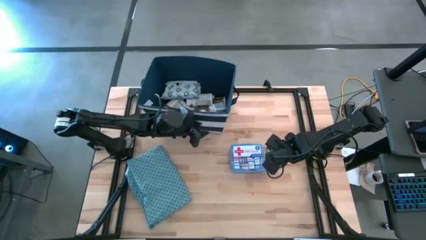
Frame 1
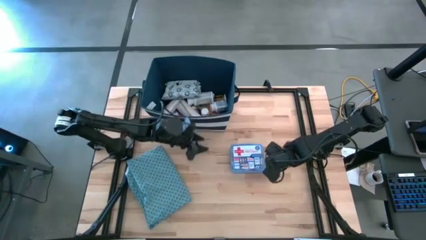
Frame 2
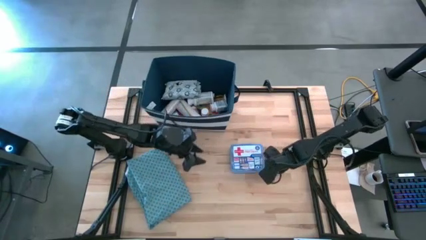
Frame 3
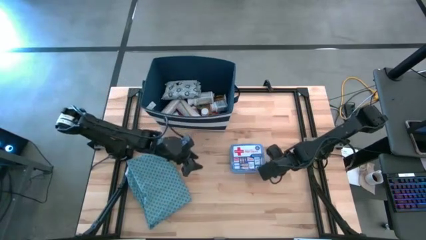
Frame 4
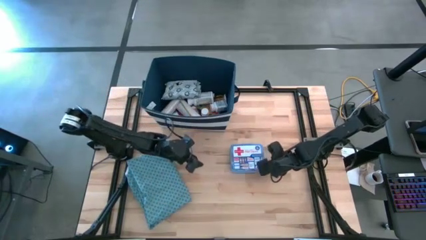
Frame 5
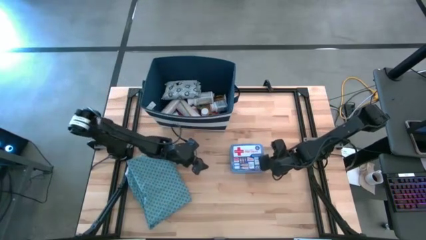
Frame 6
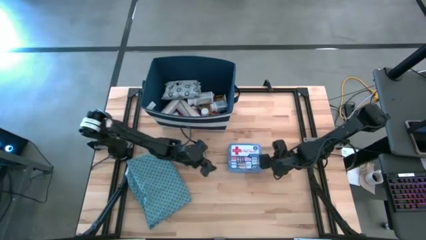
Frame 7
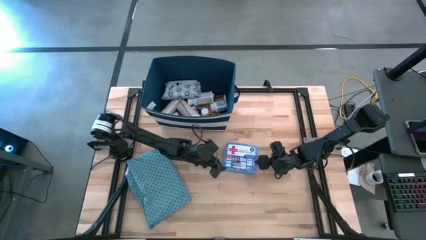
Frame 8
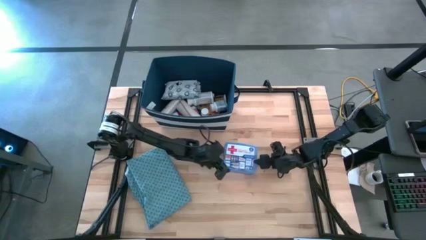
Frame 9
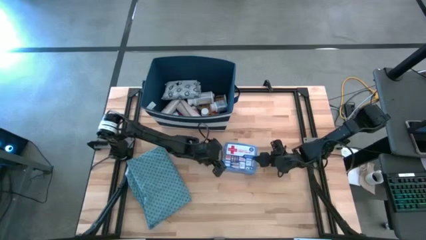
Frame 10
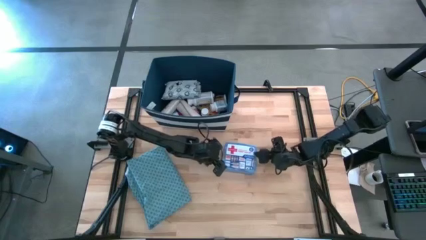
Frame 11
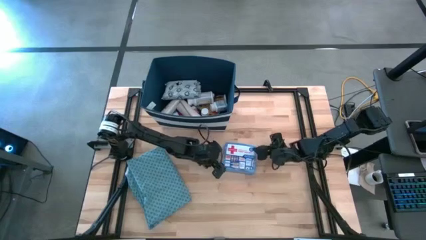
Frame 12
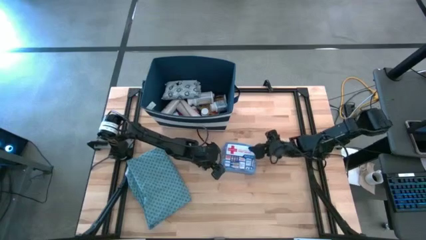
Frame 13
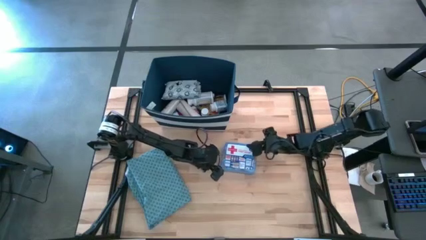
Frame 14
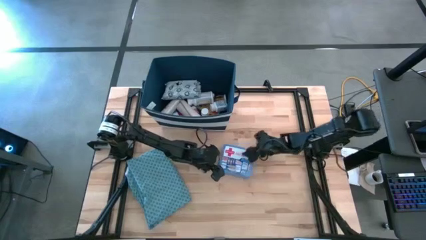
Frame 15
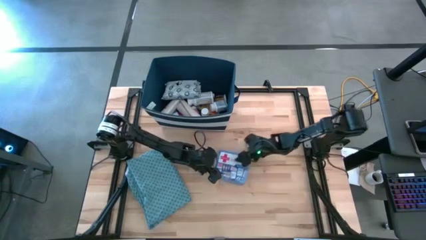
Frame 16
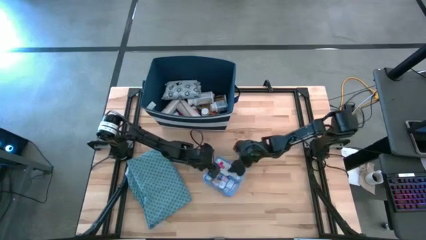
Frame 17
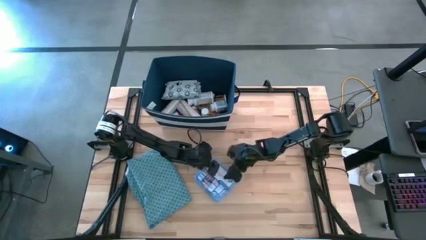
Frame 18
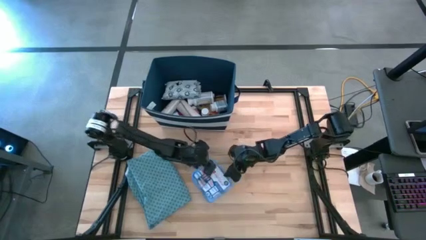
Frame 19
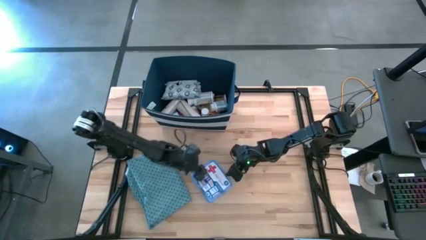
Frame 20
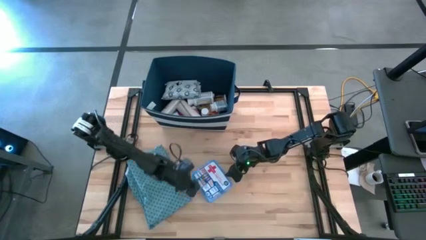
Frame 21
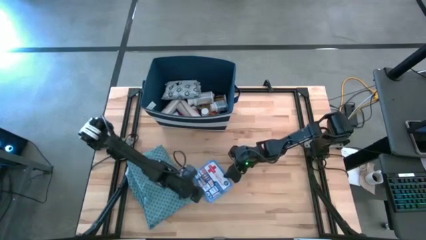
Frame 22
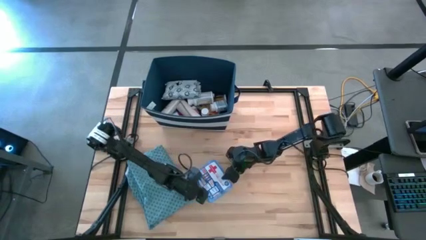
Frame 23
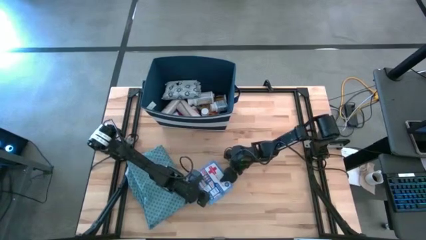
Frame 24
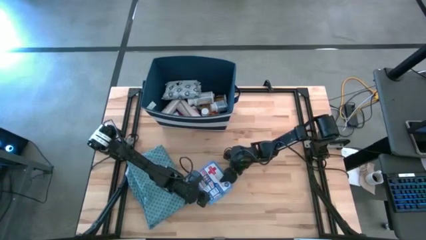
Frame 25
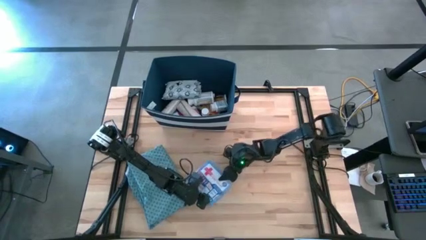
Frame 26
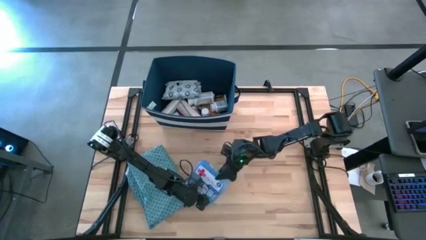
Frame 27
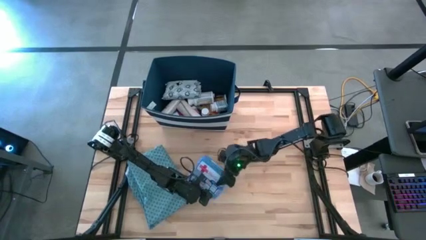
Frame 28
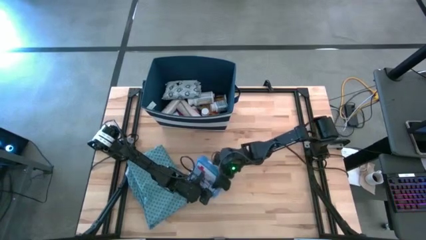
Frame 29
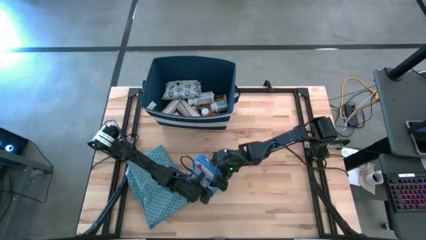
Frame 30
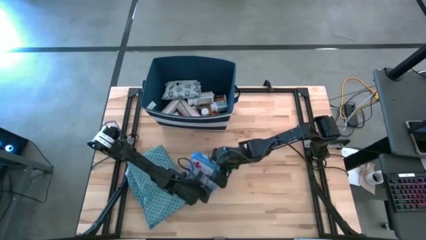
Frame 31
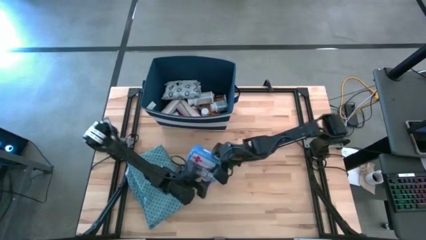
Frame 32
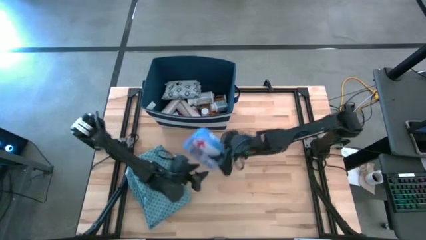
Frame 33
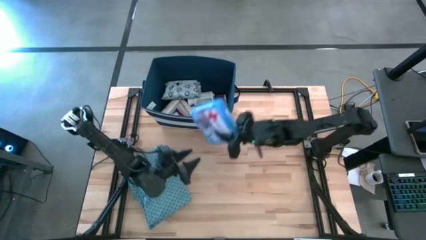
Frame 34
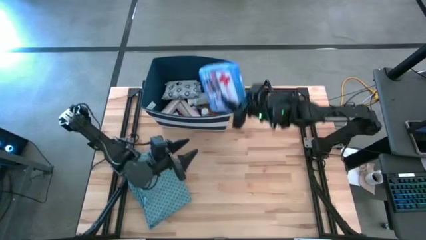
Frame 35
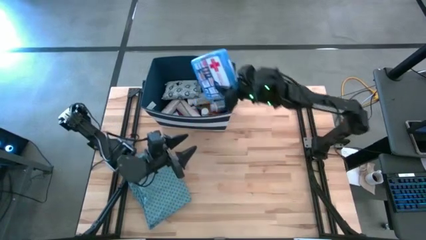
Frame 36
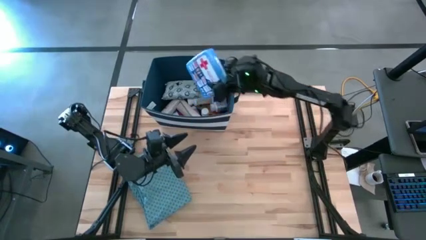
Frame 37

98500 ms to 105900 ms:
Task: Pick & place medical supplies in basket/bin
Put the blue first aid kit into the blue bin

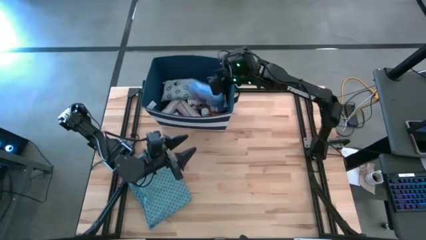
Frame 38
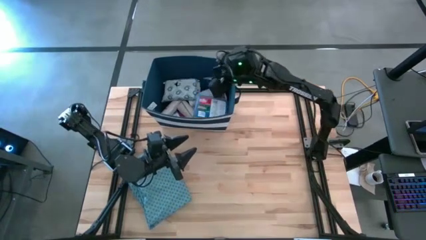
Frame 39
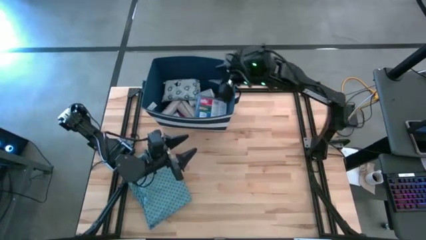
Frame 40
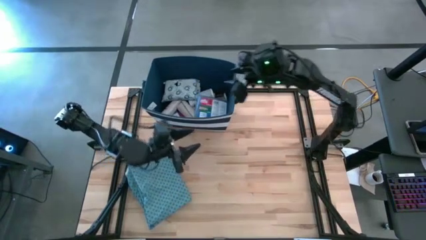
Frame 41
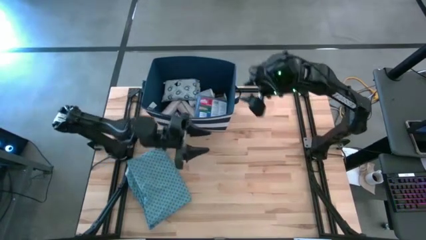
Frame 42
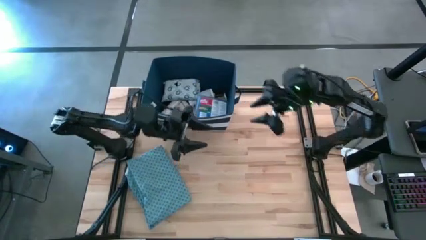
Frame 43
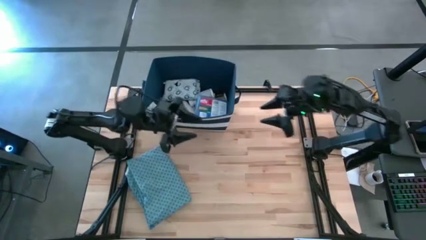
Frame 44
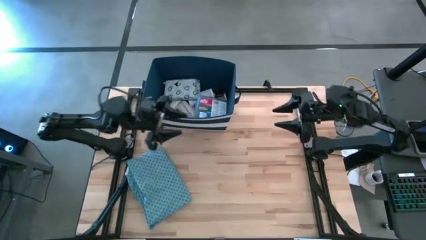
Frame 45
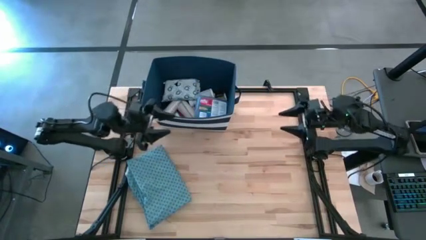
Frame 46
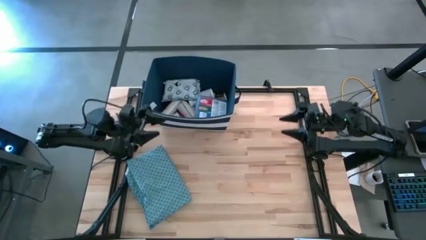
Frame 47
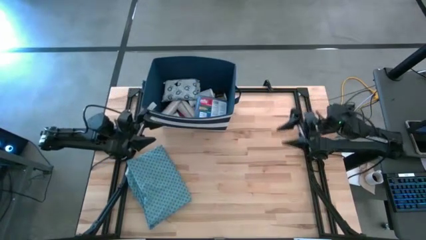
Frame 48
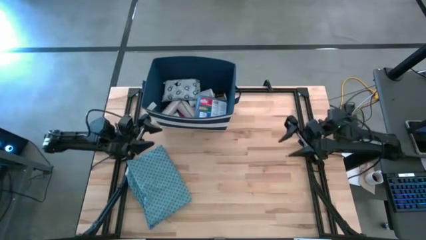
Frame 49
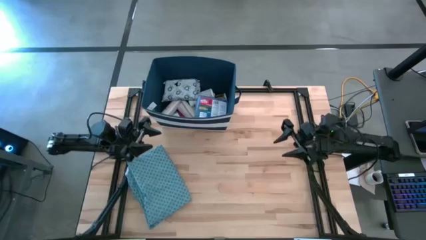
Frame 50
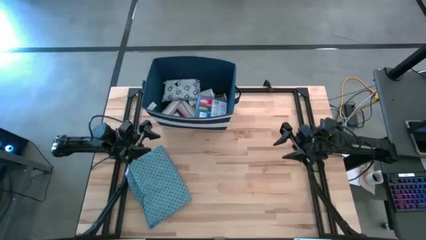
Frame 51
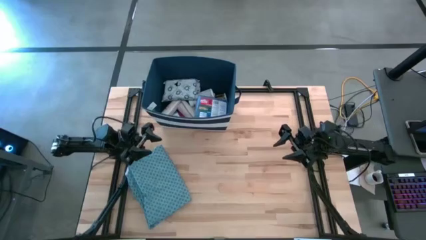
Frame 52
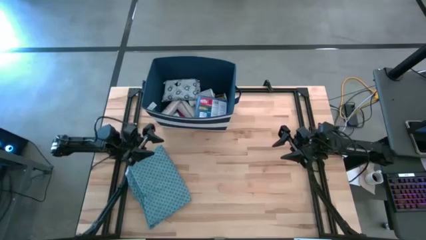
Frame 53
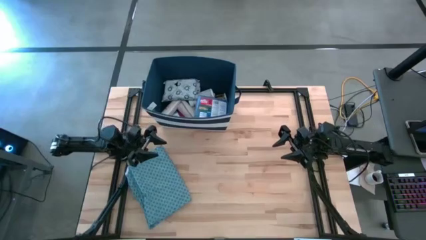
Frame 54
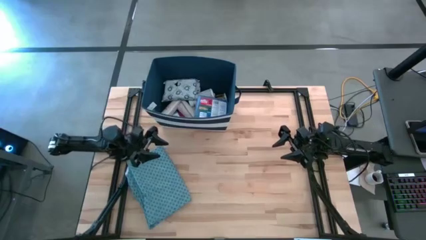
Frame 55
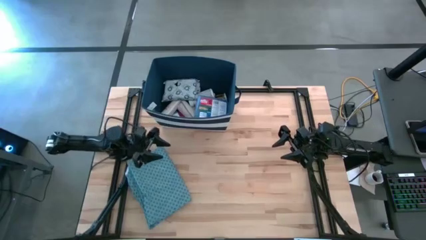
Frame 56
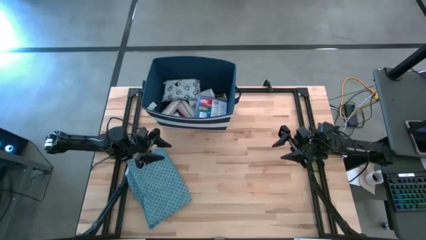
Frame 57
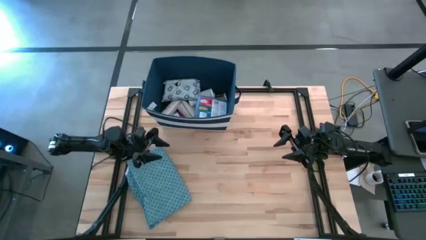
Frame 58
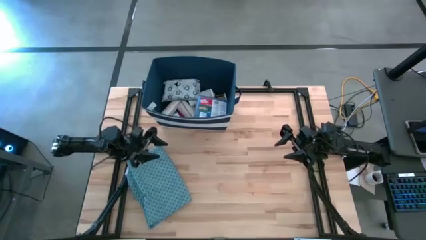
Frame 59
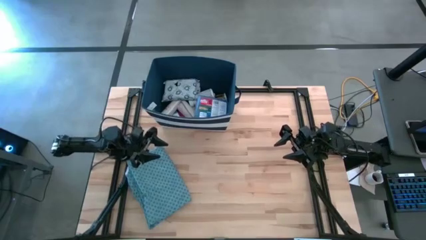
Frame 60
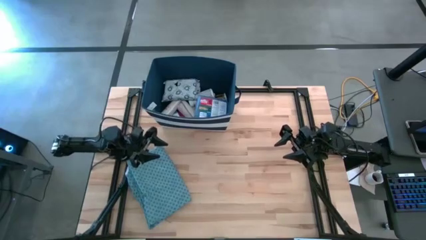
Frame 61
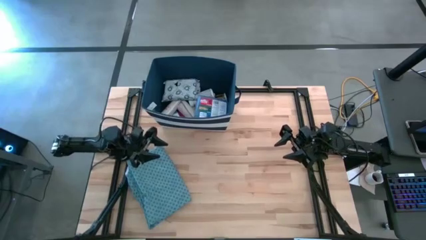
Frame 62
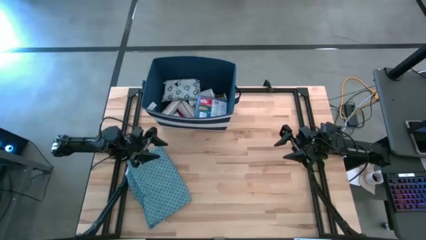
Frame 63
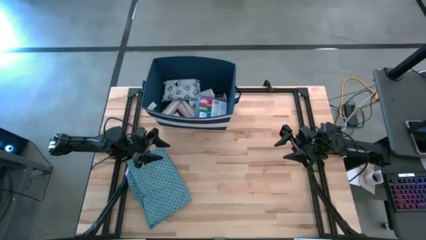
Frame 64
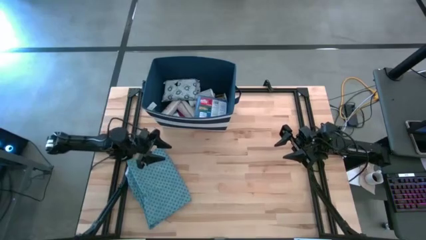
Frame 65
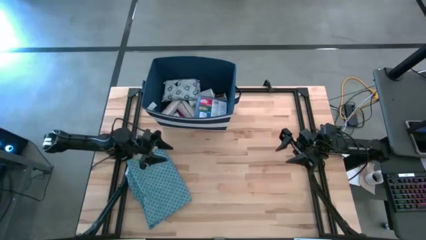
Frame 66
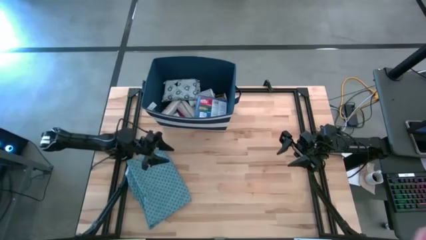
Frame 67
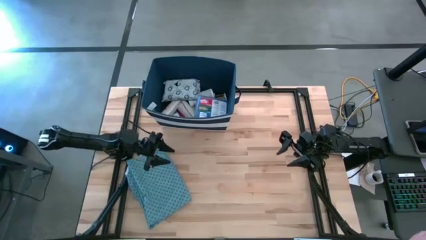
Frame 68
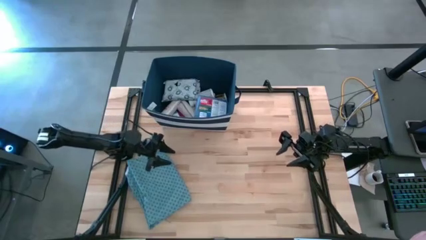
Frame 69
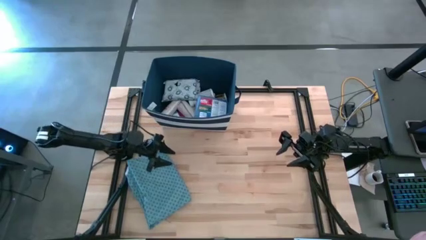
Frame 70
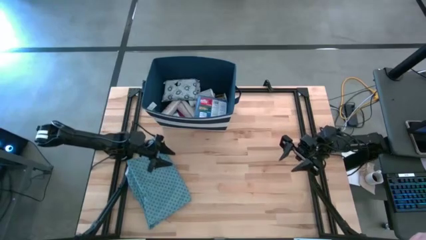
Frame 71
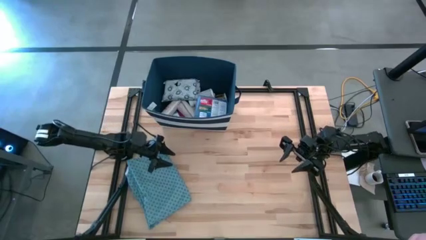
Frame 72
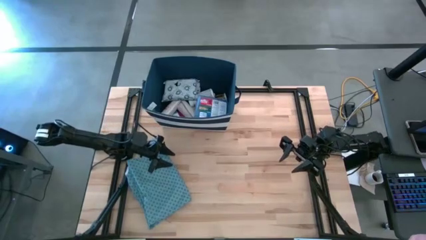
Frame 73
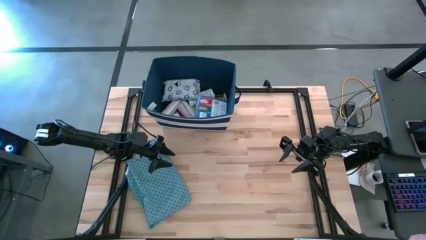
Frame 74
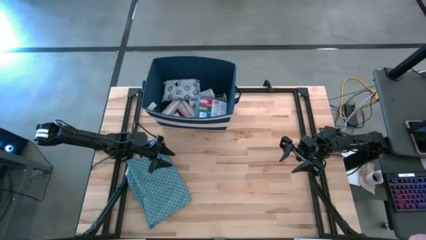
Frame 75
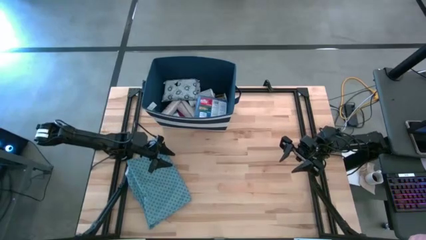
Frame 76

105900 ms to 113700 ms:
Return to Home Position

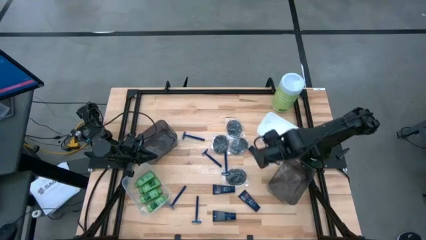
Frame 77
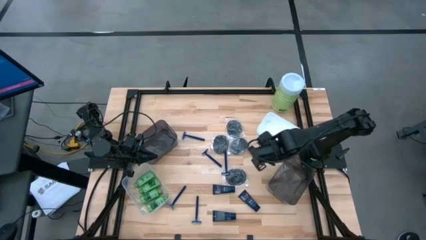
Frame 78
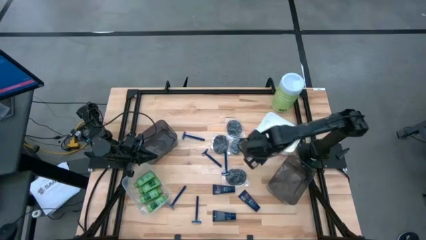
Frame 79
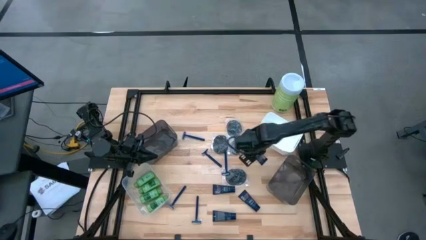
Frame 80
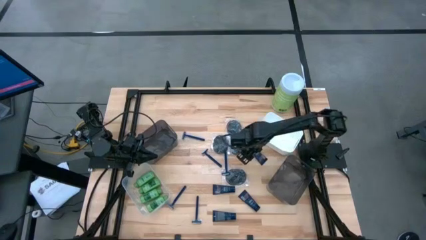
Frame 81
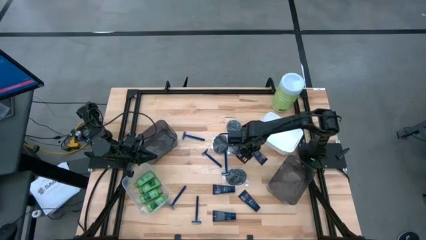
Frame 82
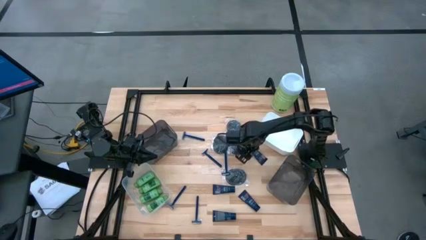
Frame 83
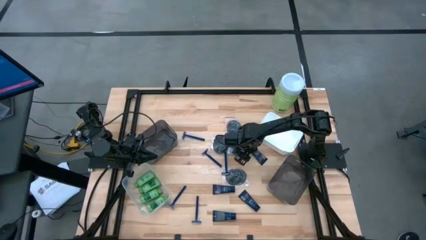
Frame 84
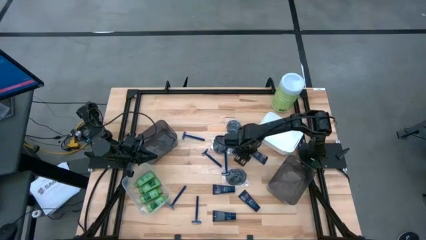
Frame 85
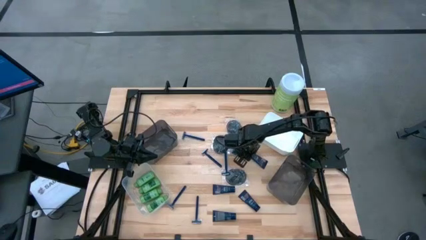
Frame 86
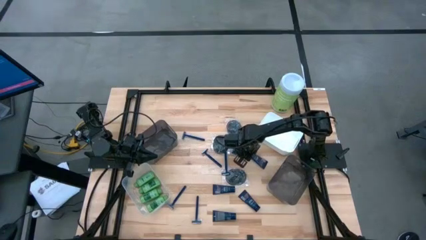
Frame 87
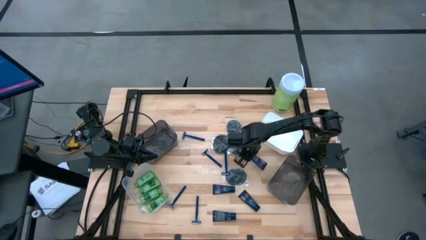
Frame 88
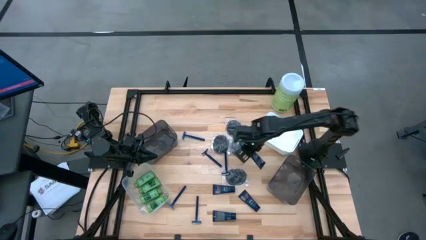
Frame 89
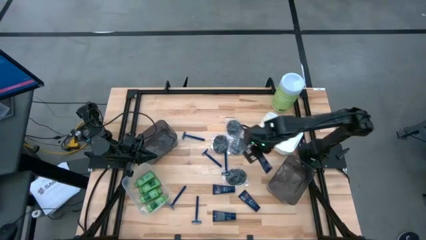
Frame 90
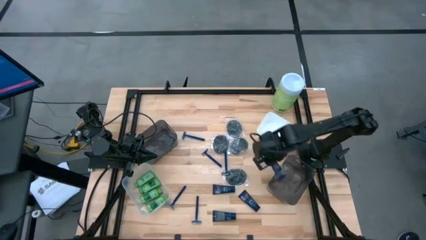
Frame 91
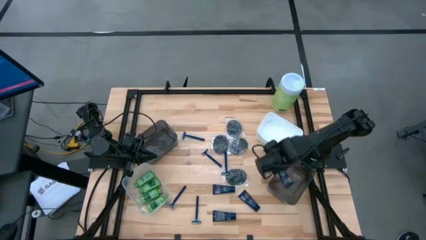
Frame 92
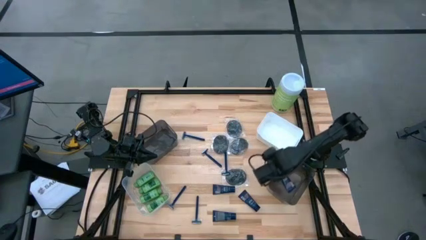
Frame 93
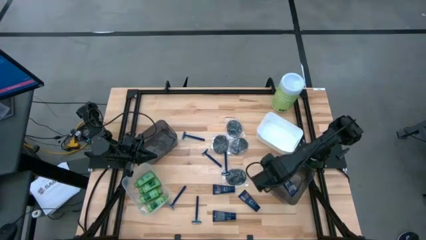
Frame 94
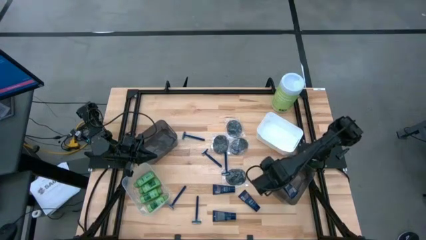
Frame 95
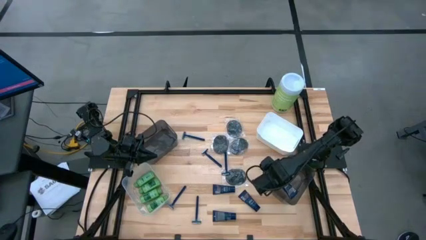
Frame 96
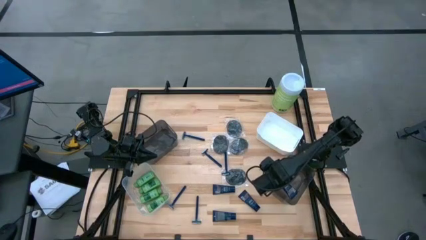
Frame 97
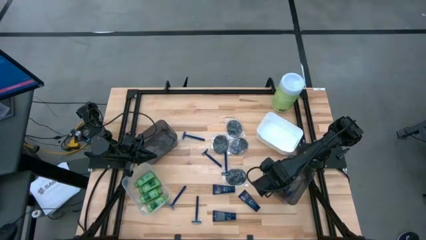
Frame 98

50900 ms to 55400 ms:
Task: Pick & Place Travel size toiletries
Put the blue shave cream into the right black bin
